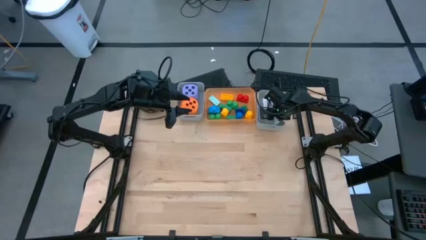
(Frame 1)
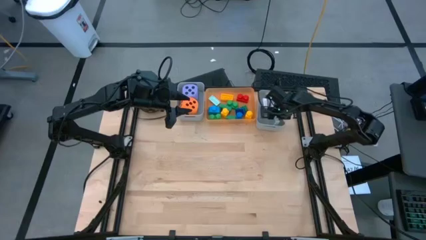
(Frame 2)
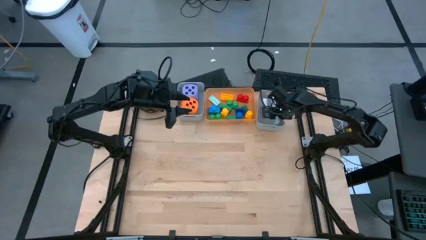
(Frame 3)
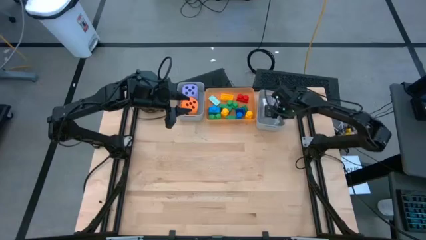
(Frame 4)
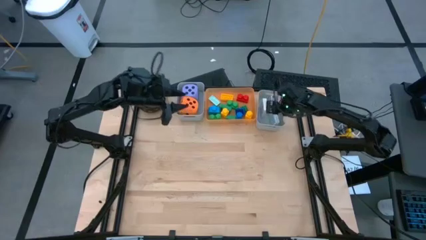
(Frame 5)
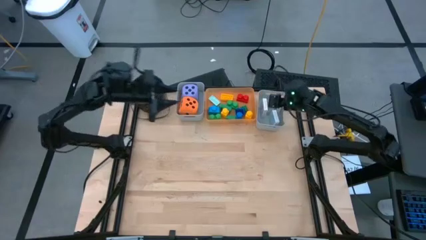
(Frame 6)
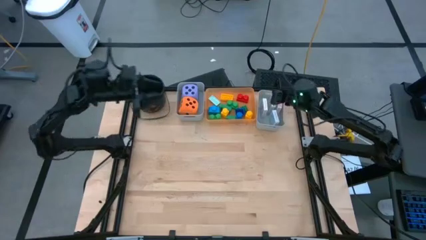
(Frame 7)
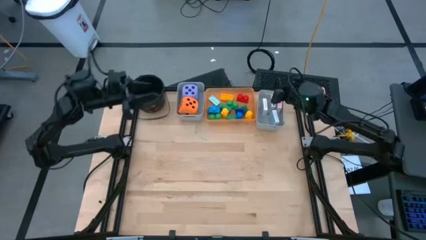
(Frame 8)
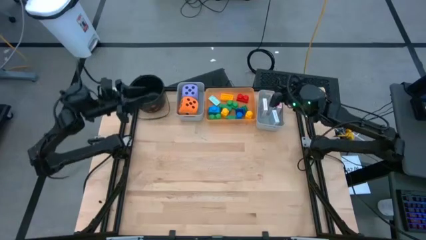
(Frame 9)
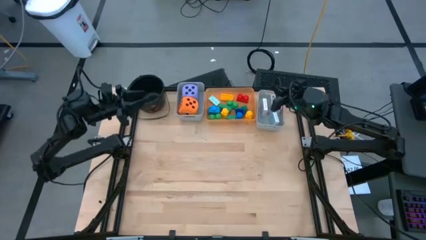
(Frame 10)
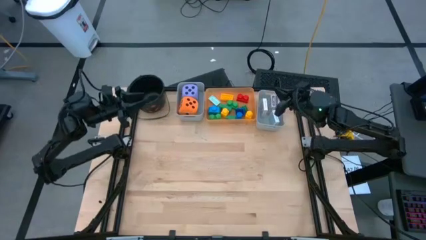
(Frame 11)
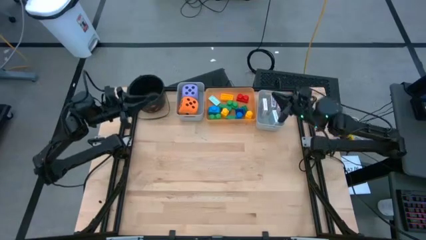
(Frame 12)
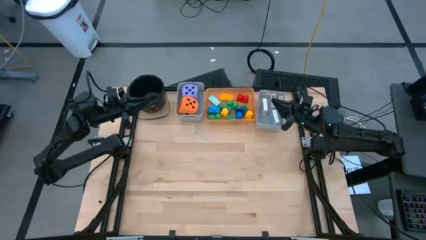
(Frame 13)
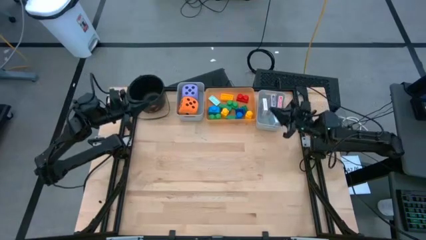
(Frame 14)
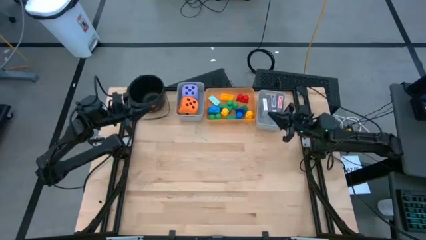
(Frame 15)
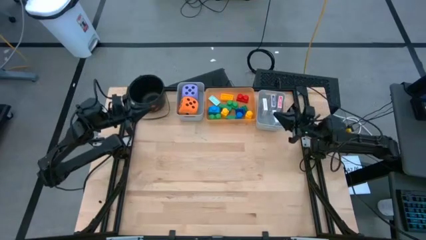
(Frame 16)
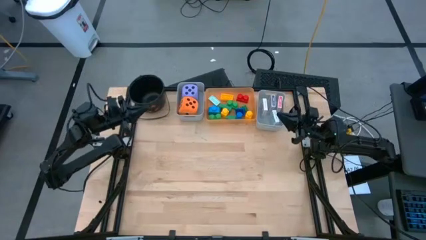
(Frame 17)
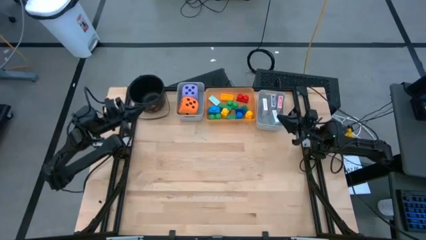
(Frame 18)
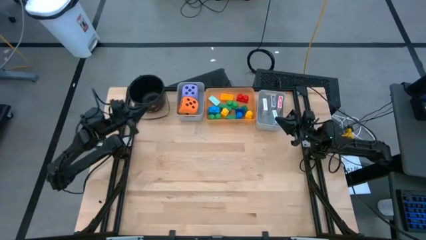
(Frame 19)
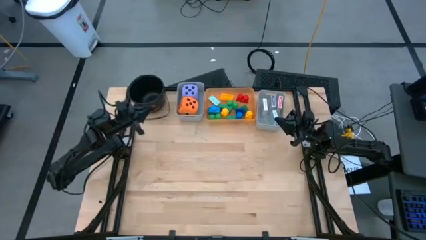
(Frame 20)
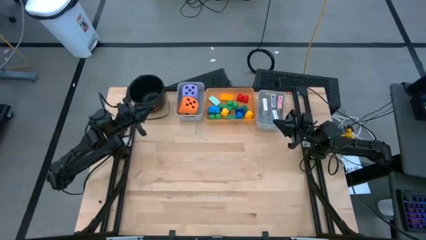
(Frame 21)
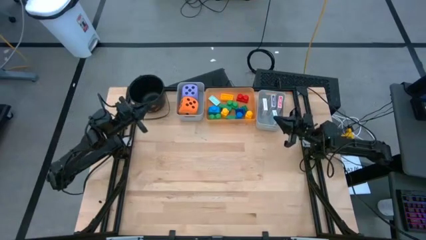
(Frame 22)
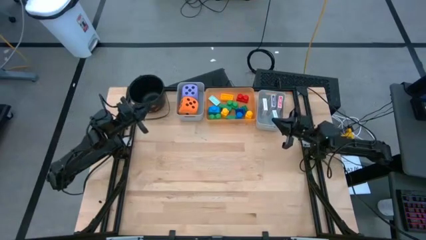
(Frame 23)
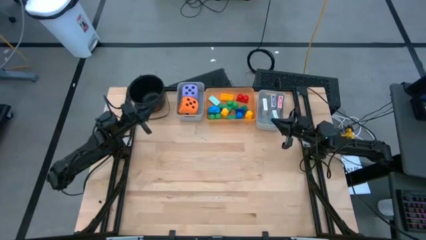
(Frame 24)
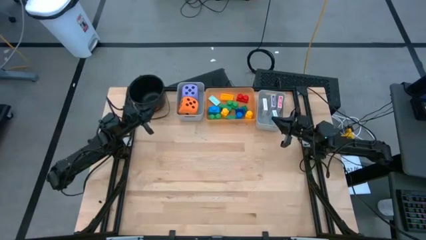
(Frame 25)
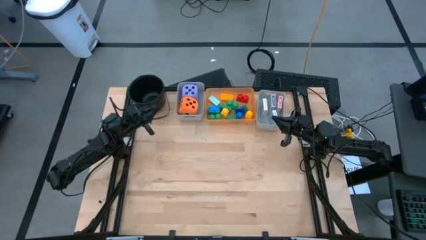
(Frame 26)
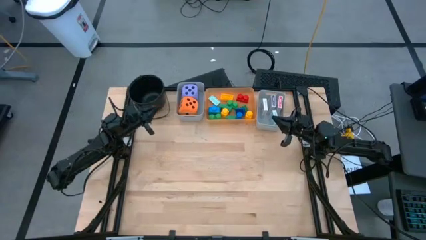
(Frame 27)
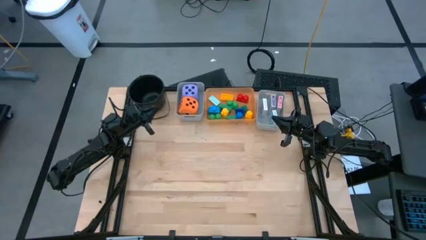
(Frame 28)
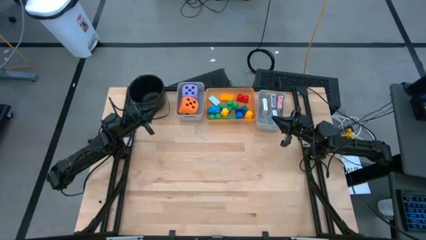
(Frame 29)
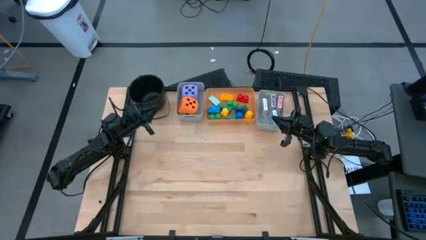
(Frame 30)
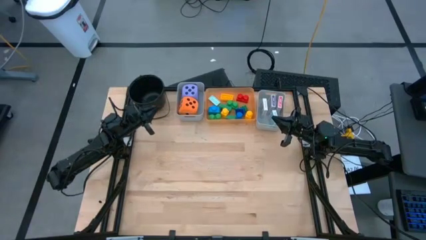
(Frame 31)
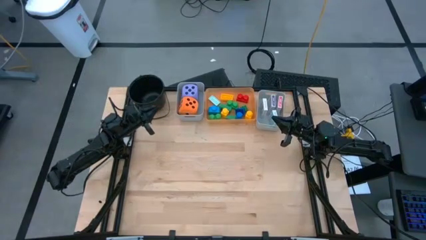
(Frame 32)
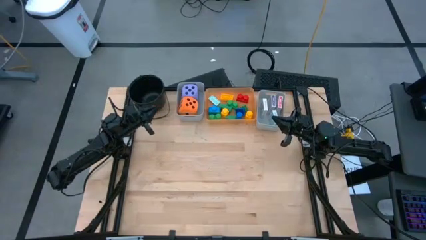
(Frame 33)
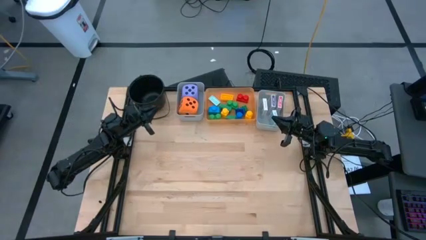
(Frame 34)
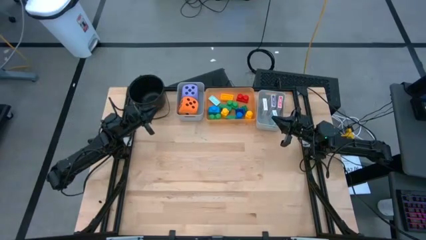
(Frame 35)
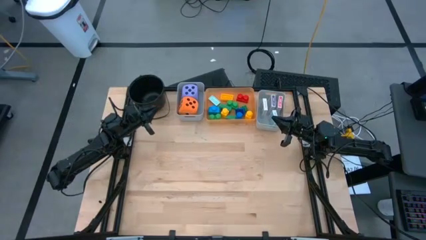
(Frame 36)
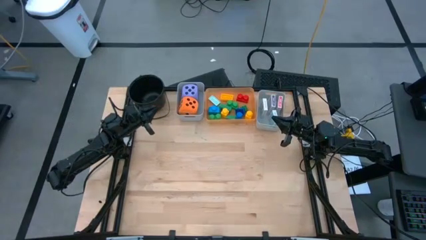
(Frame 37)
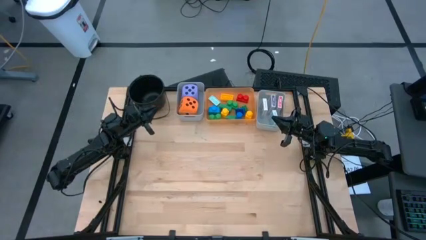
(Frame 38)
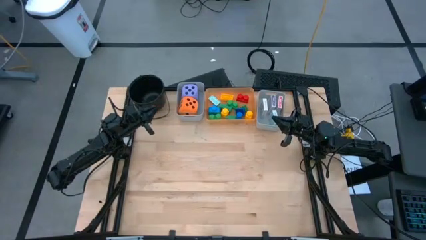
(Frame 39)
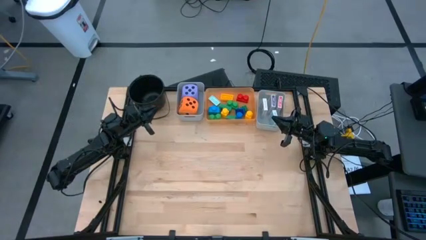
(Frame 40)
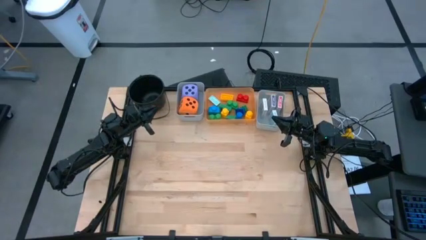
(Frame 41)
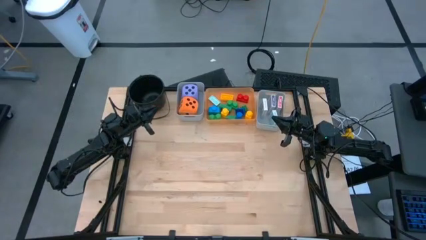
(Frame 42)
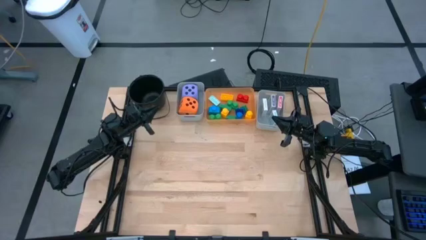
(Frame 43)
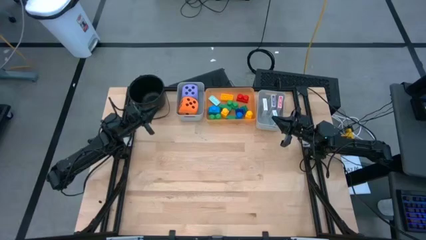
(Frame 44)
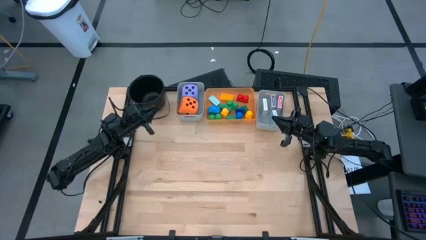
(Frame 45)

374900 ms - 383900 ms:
Task: Pick & Place Toys
Return to Home Position
